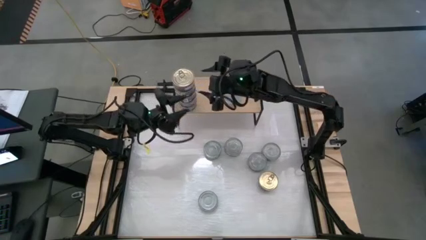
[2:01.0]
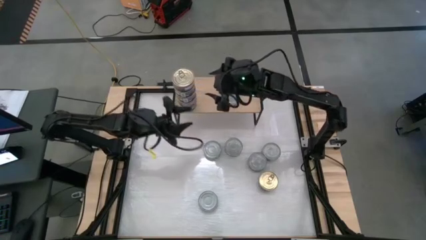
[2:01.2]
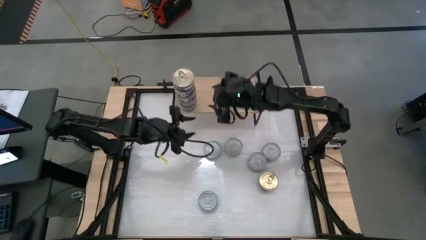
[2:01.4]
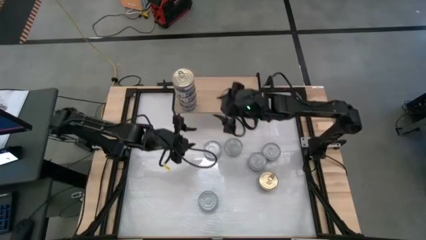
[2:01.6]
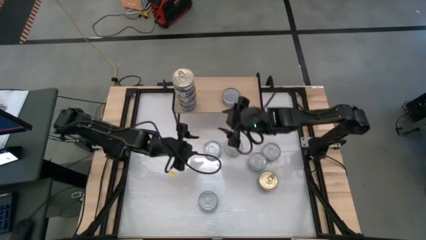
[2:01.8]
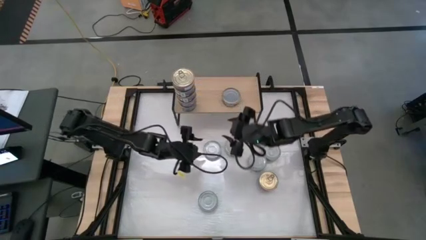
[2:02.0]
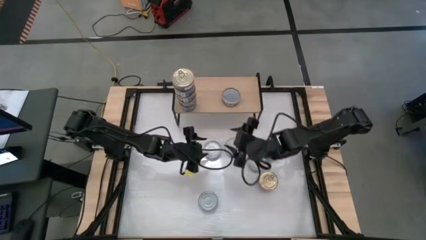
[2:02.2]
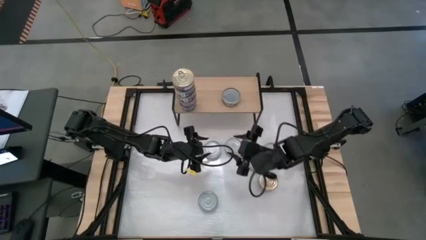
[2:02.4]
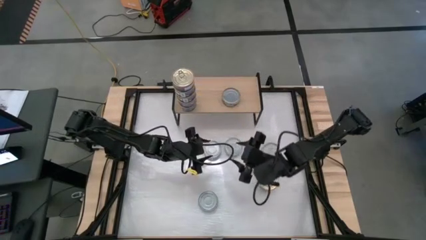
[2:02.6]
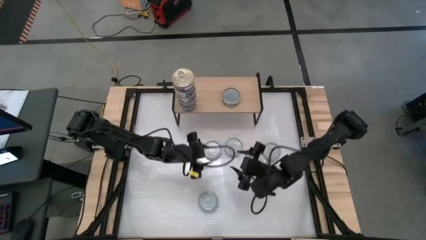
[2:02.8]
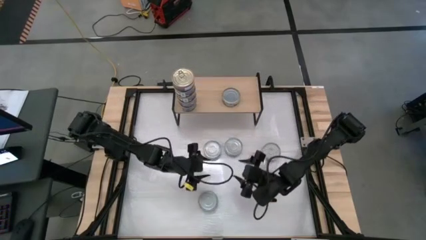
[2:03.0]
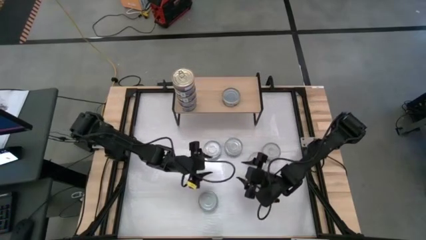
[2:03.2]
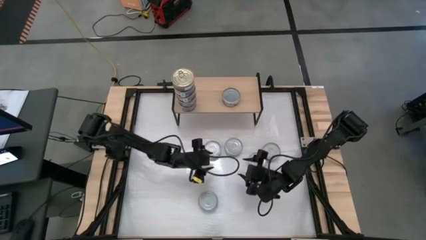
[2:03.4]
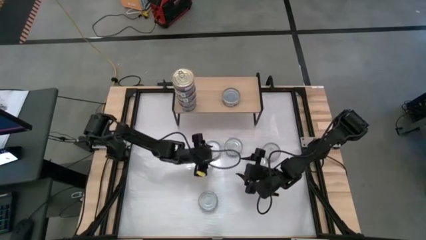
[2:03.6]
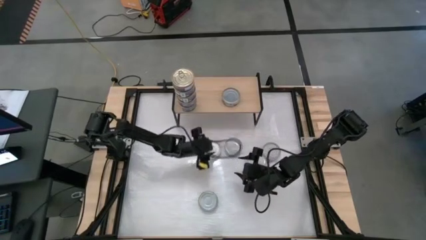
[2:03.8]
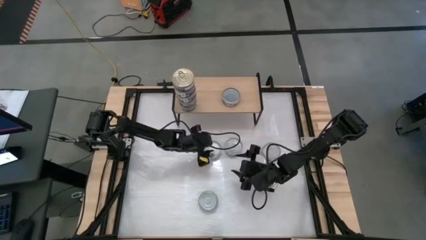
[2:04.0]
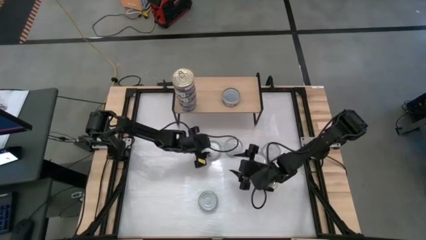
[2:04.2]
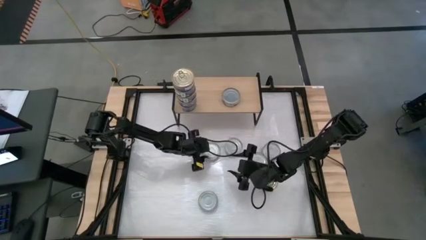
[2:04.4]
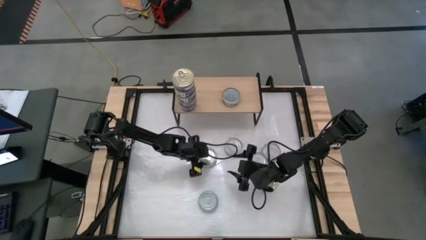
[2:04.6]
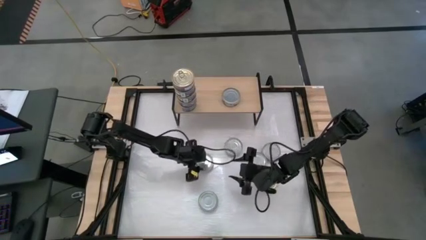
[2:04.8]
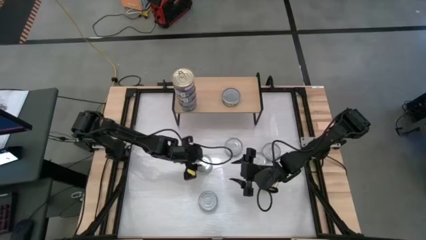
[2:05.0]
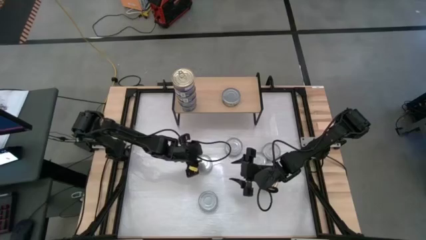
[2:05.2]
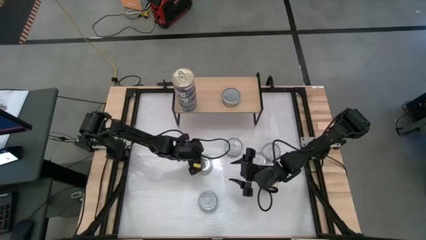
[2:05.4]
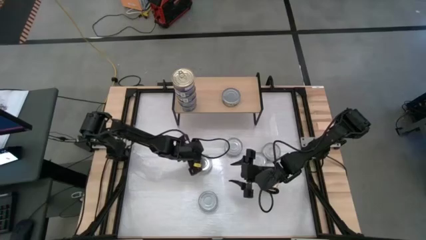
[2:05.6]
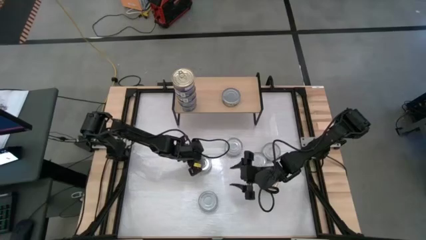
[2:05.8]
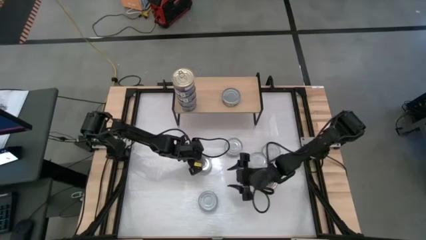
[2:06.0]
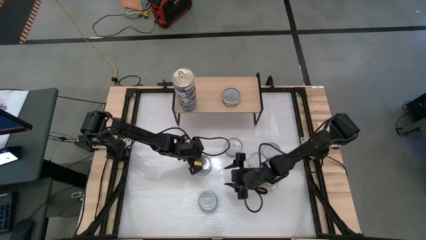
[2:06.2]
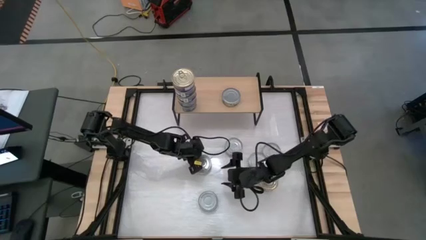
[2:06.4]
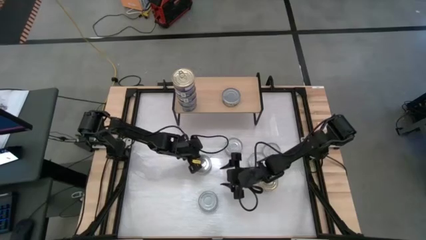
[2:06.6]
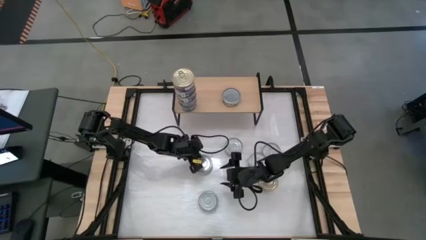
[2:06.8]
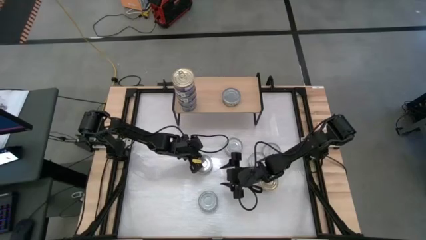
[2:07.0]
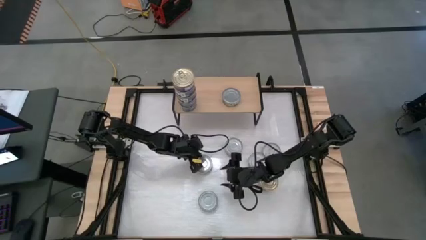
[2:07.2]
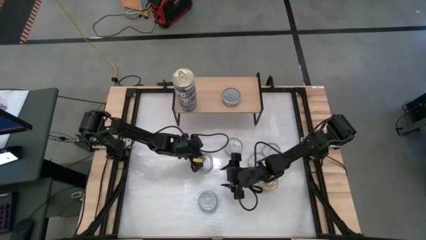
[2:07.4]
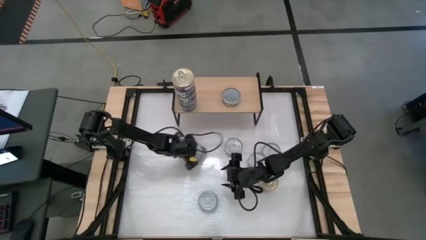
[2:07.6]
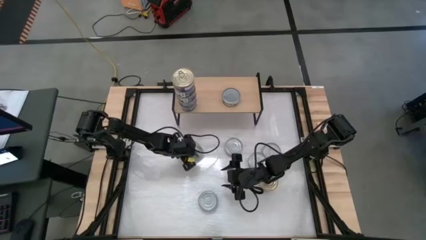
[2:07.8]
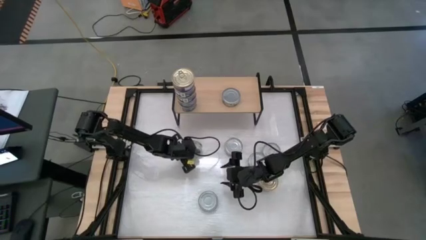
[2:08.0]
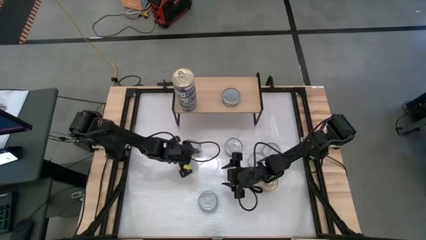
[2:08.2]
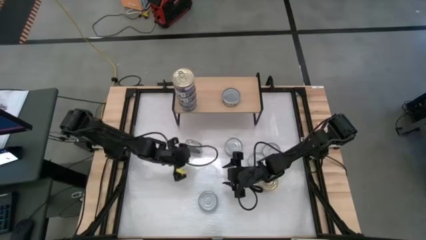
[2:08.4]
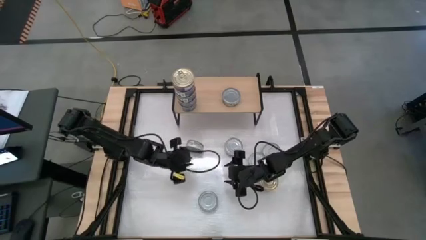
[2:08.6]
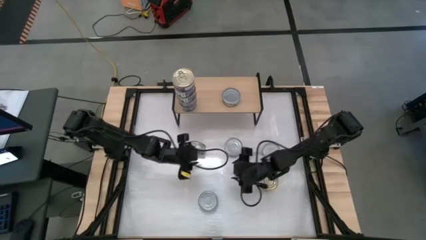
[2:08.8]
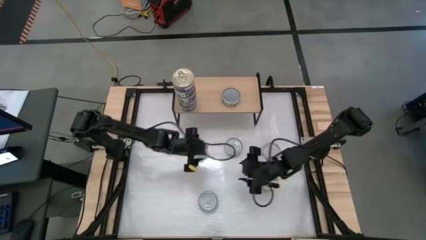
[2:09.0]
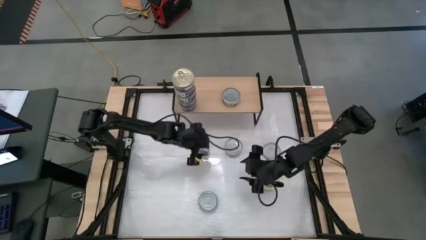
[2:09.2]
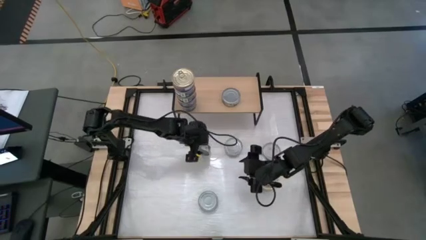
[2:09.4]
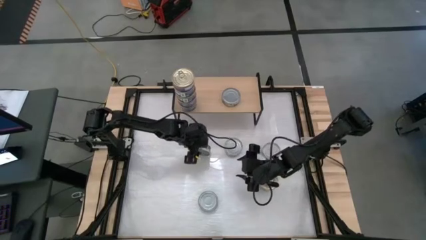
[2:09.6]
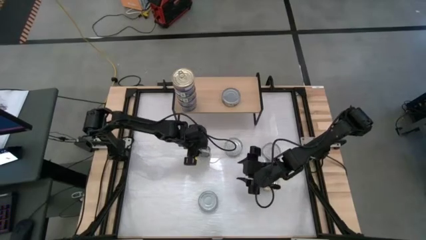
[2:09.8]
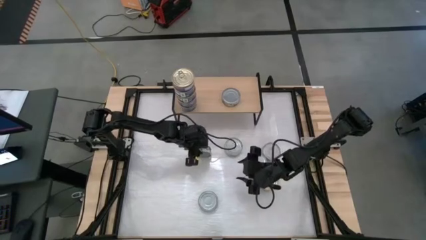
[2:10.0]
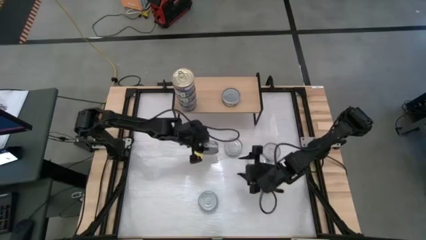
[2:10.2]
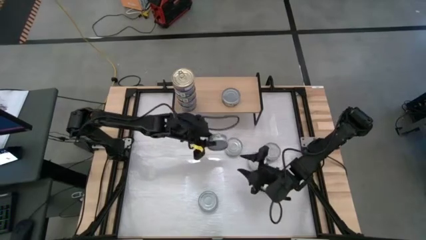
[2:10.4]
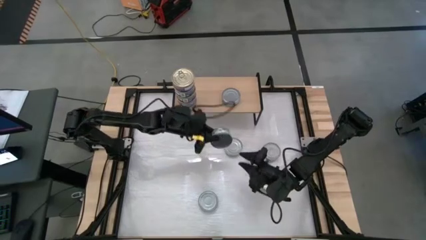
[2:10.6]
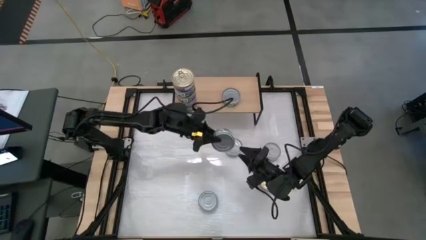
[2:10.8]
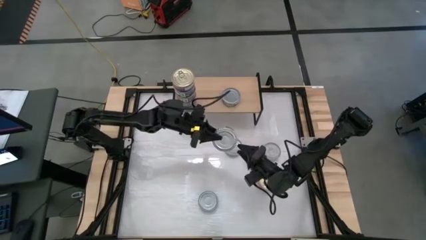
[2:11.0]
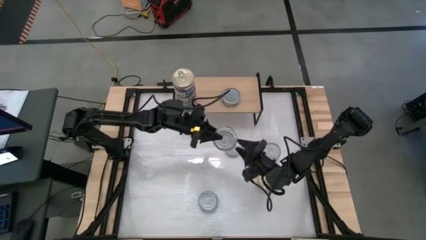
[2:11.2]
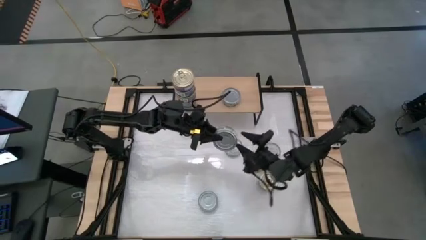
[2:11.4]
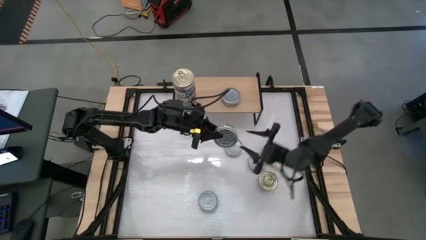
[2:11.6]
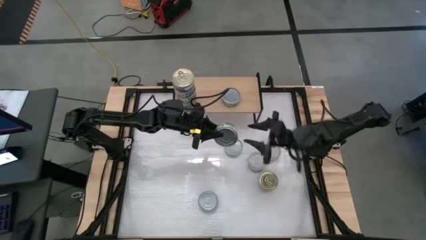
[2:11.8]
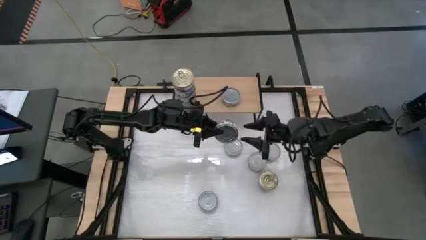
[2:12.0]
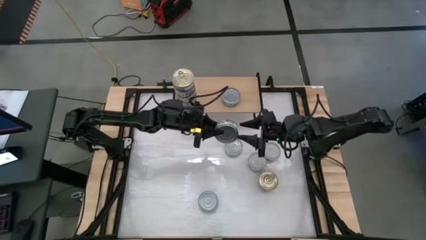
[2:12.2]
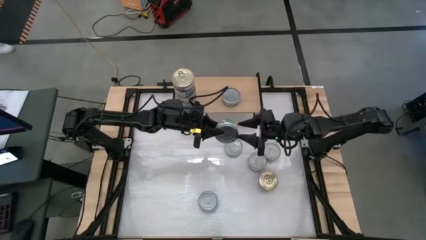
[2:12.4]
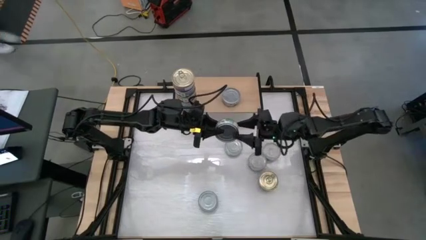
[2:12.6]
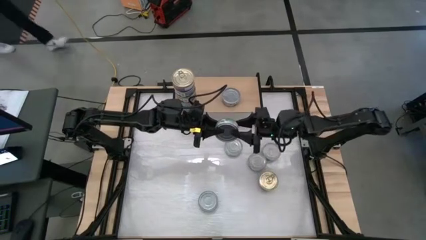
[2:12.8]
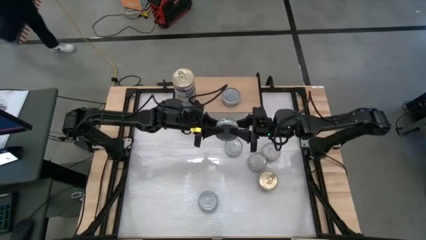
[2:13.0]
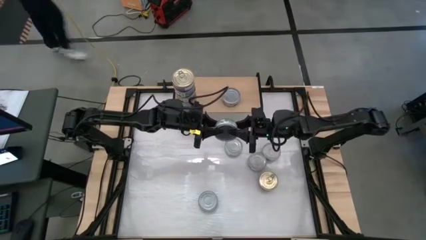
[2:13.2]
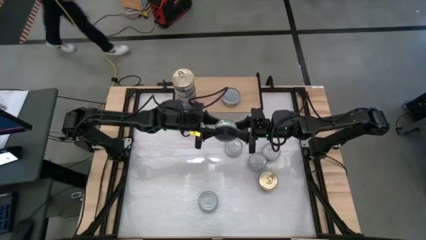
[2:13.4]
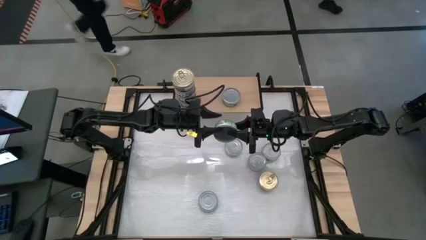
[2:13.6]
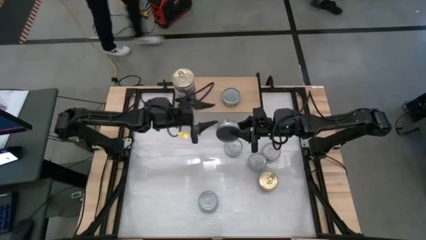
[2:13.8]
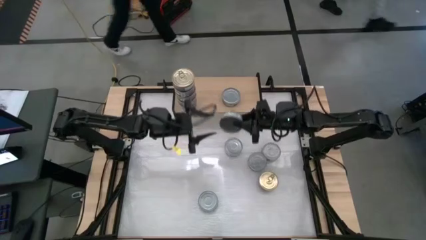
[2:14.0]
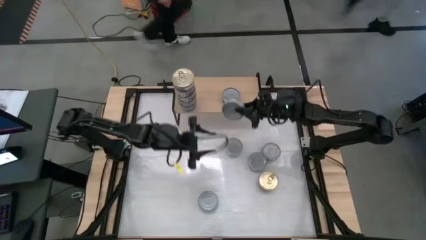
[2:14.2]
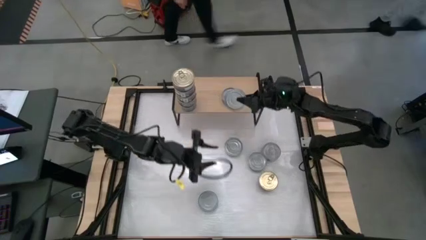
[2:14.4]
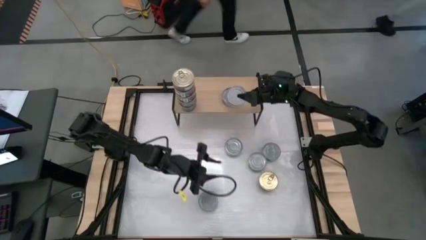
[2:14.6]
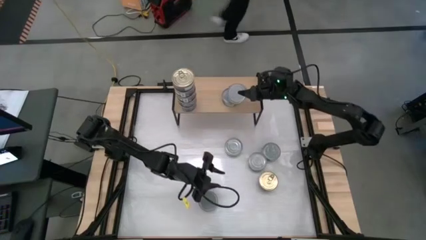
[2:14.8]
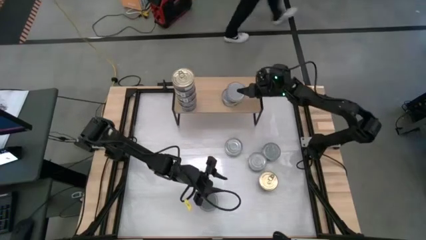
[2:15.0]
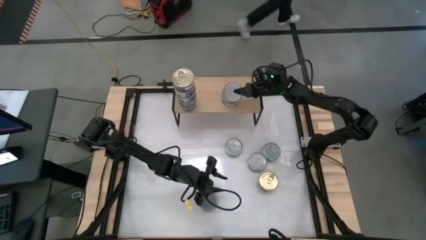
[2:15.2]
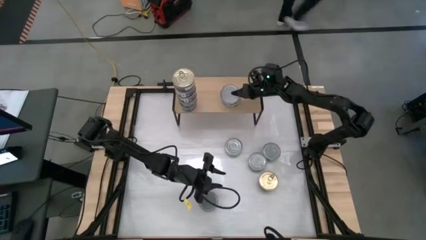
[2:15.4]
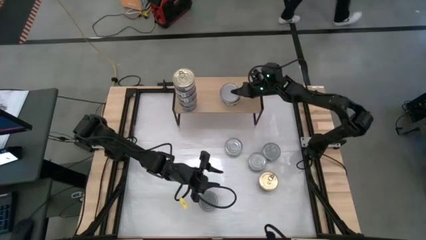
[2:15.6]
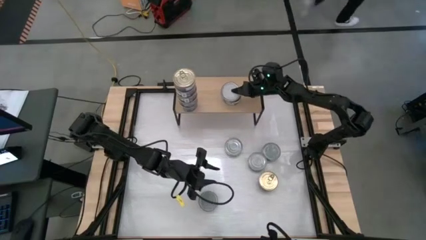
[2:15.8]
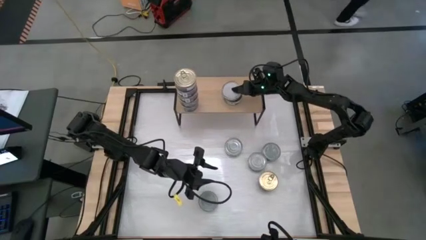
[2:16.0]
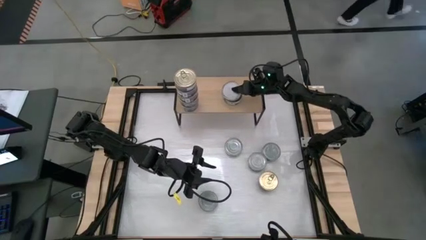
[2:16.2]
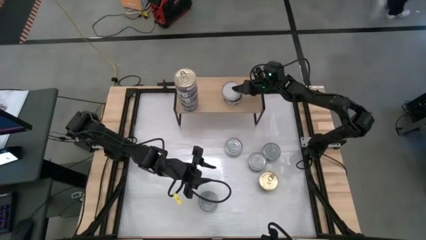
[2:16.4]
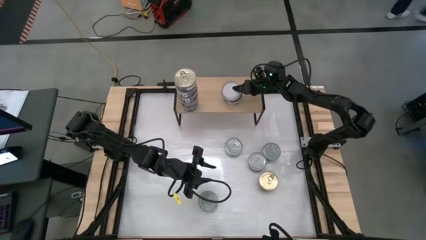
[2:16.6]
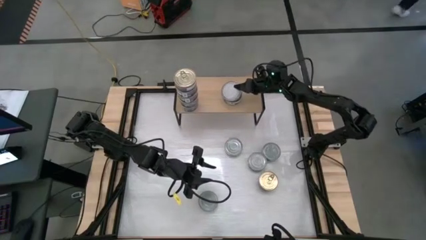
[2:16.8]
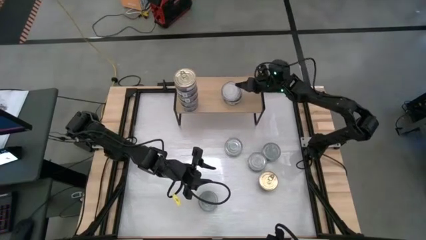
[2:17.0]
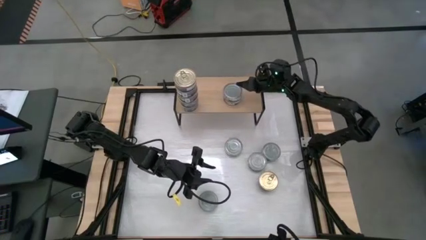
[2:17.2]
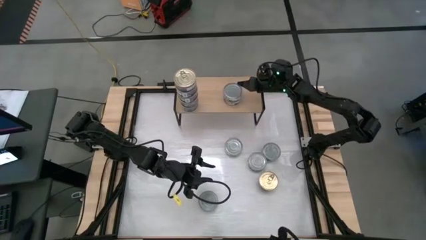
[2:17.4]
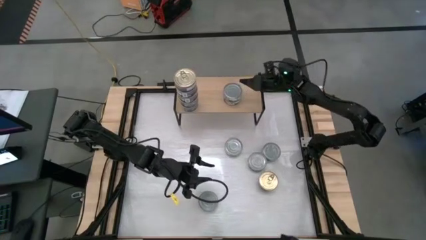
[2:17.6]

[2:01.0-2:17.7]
Task: Stack canned seafood by type on shelf
Stack the green tuna can on top of the other green tuna can on the shelf
